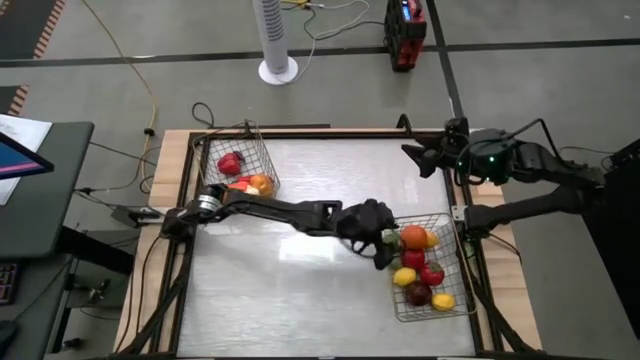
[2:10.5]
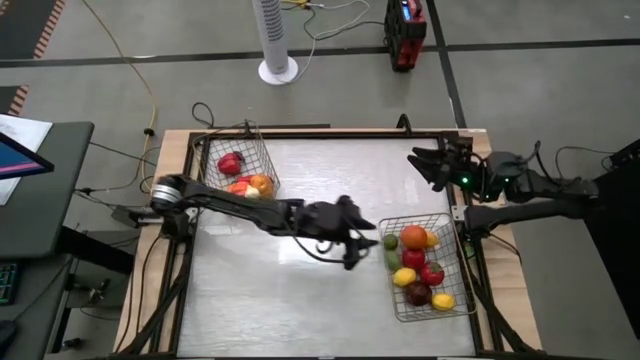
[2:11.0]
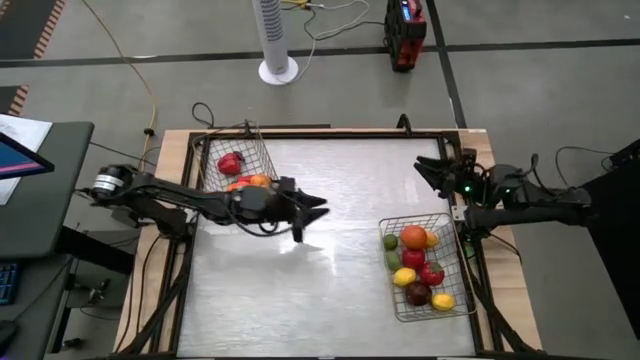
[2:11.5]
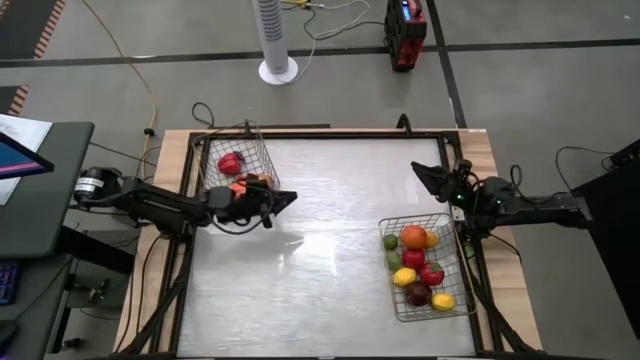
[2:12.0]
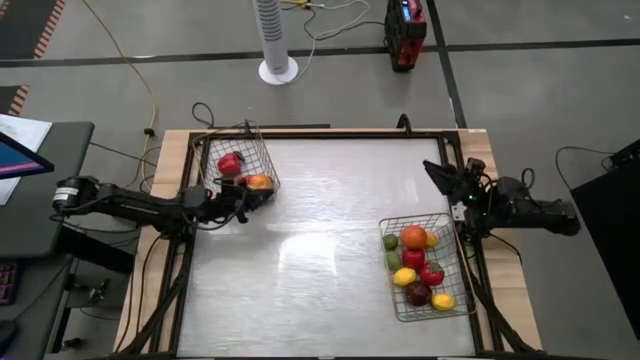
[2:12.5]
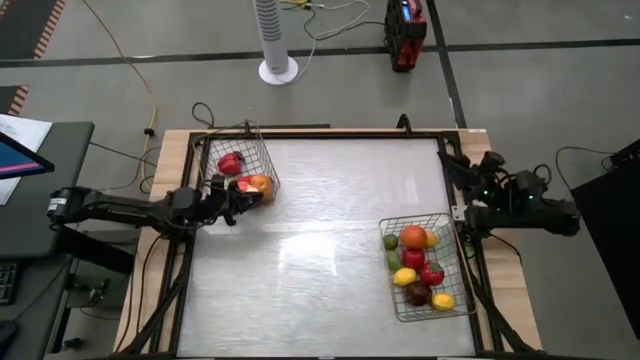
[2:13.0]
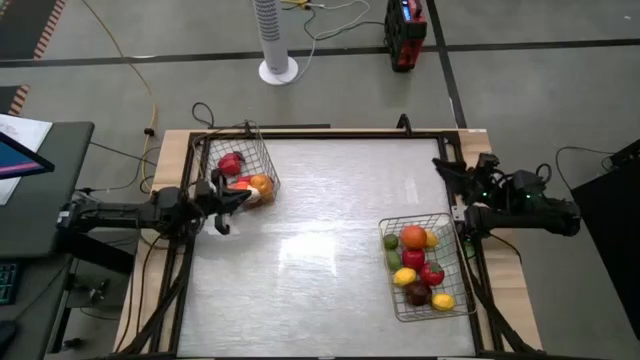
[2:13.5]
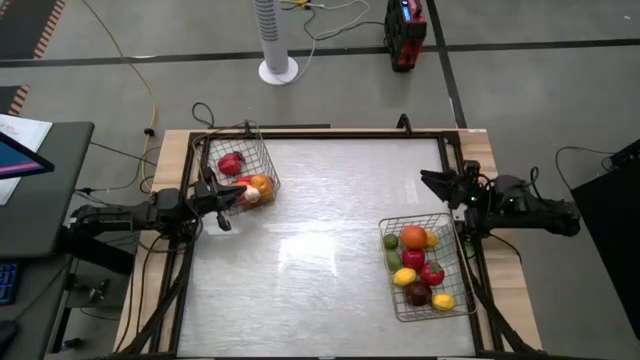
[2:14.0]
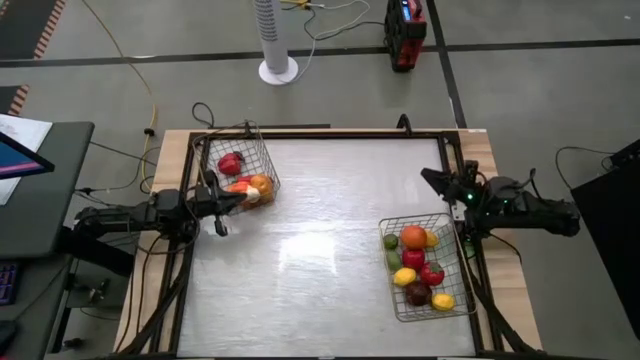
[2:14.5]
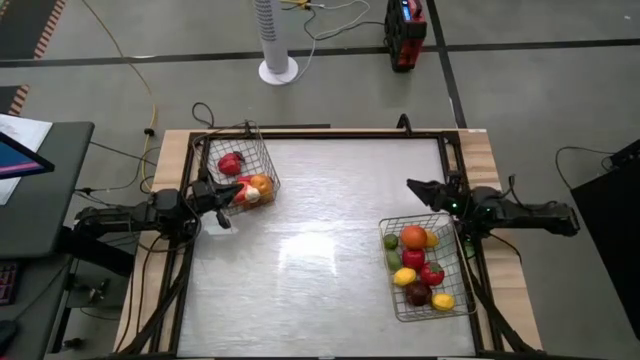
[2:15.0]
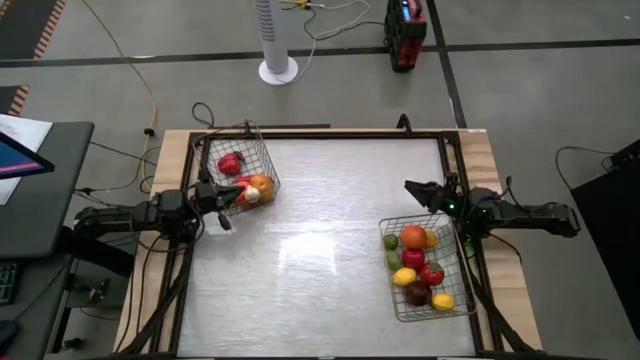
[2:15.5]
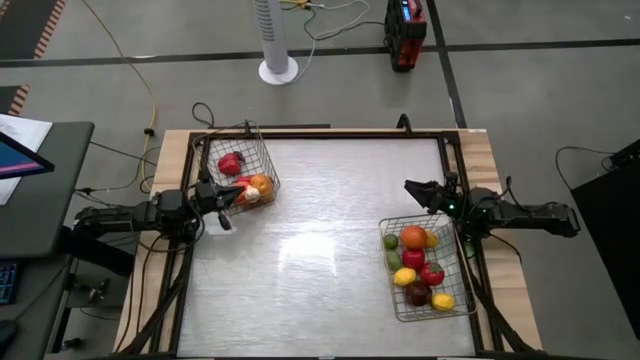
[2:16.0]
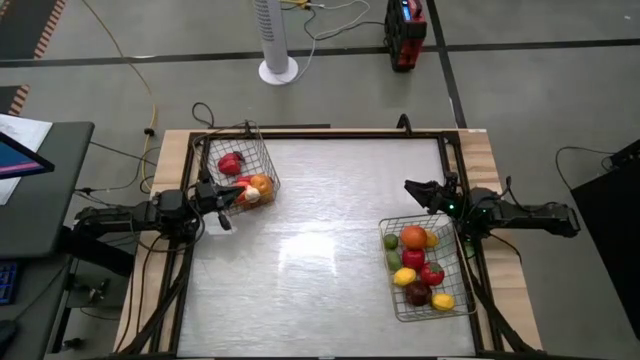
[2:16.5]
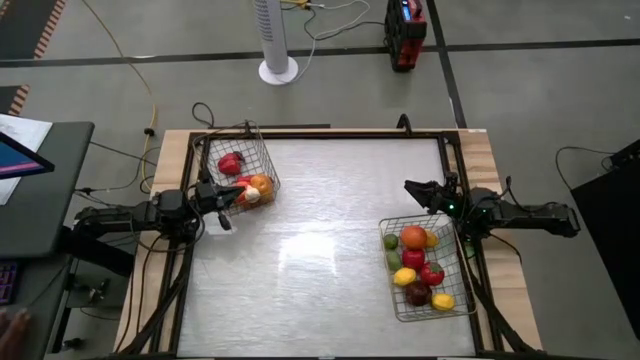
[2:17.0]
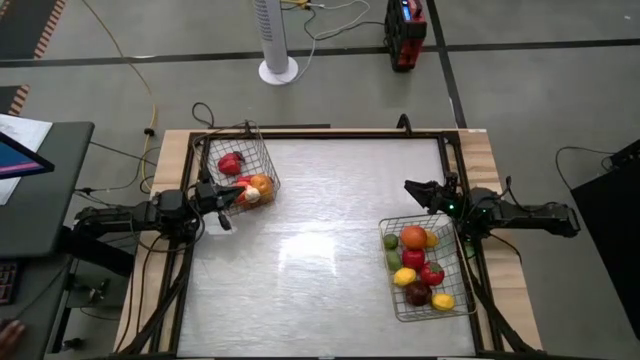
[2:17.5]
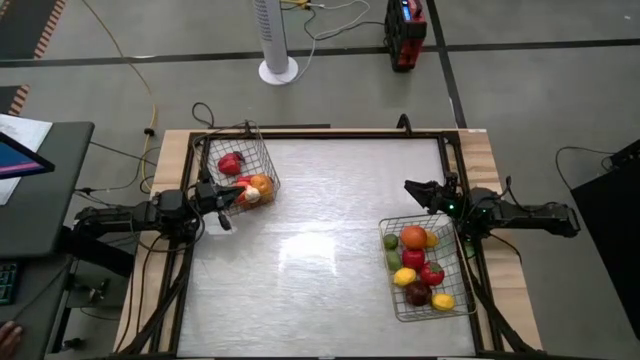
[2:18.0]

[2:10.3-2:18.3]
Task: Sort produce into baskets
Return to Home Position

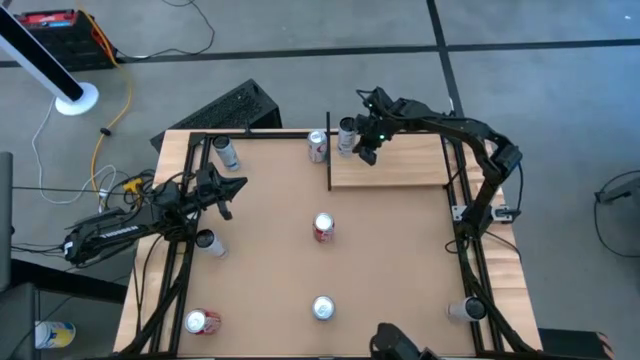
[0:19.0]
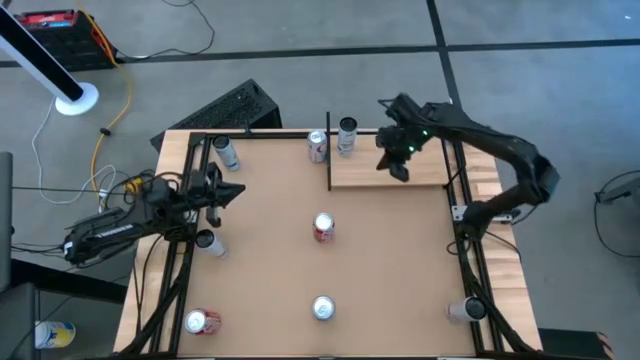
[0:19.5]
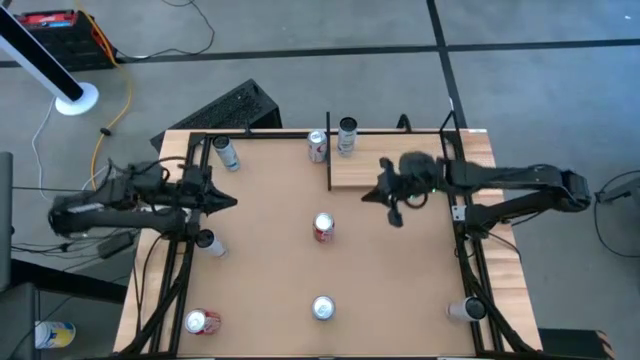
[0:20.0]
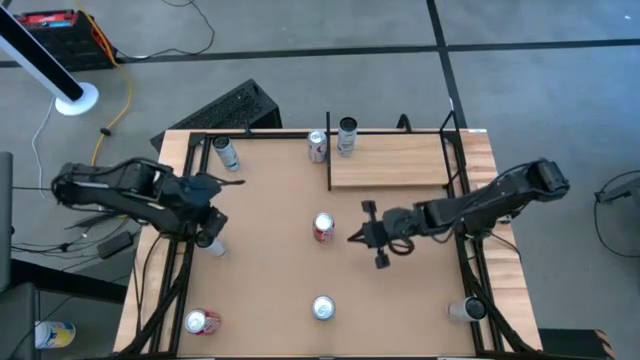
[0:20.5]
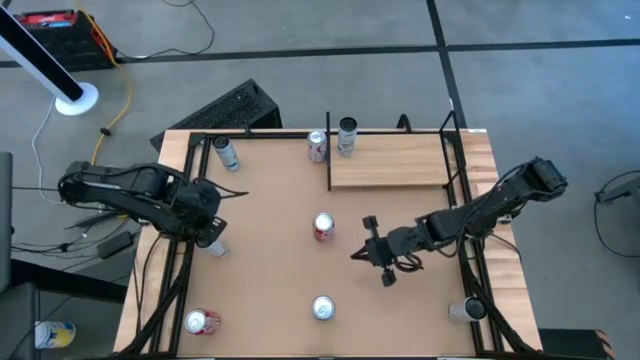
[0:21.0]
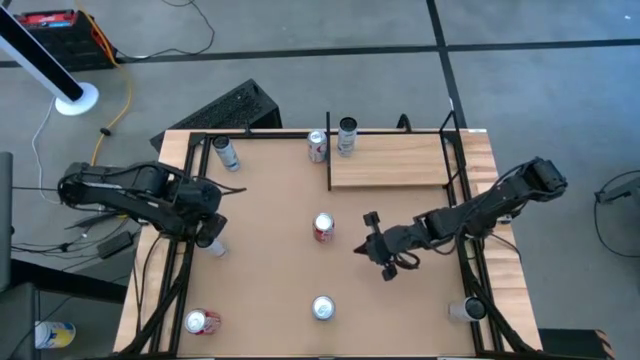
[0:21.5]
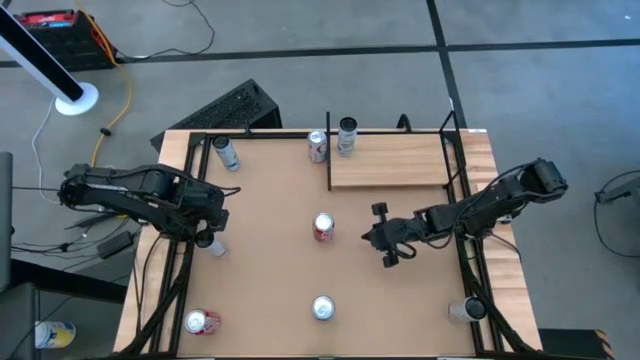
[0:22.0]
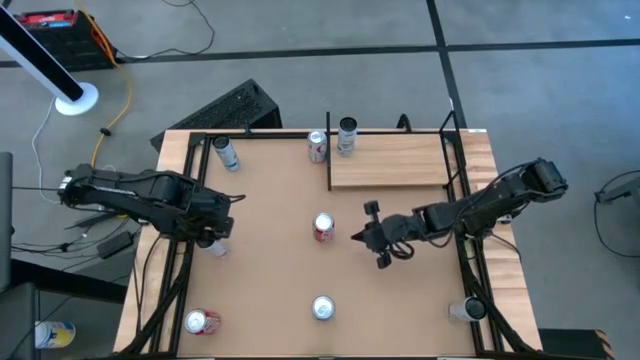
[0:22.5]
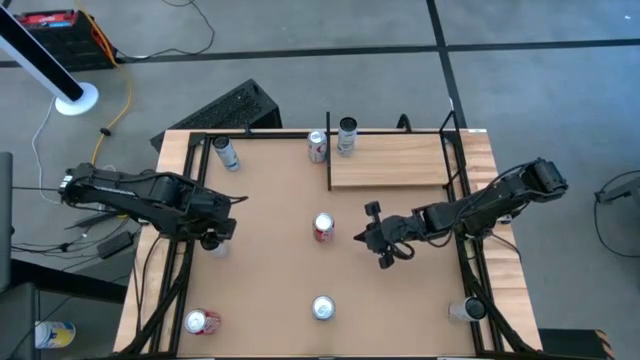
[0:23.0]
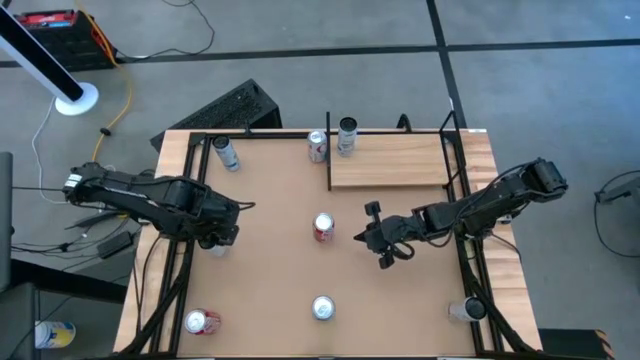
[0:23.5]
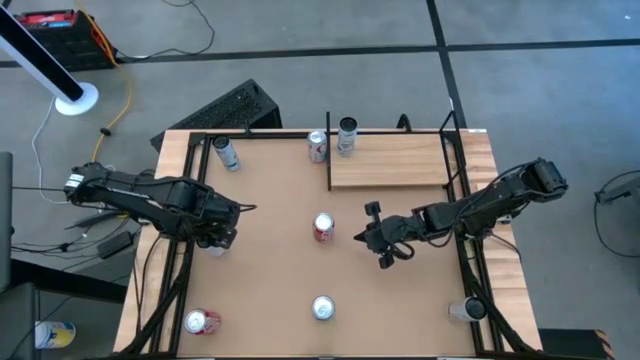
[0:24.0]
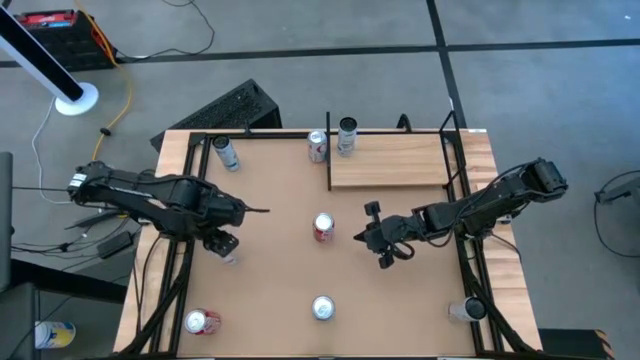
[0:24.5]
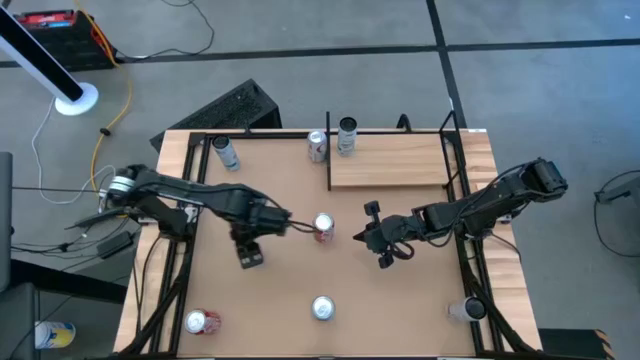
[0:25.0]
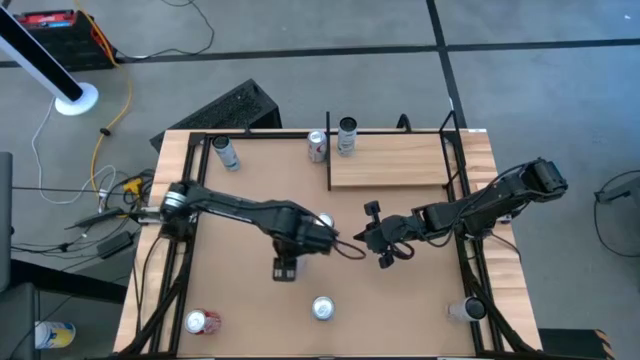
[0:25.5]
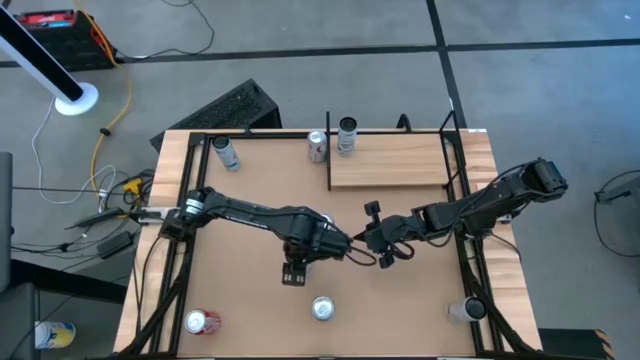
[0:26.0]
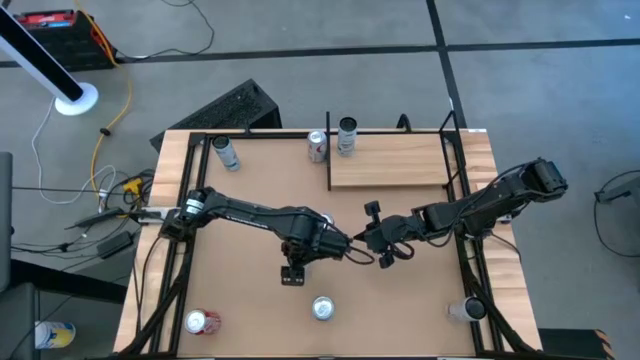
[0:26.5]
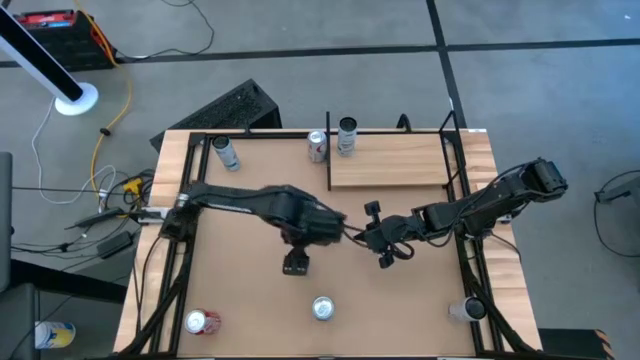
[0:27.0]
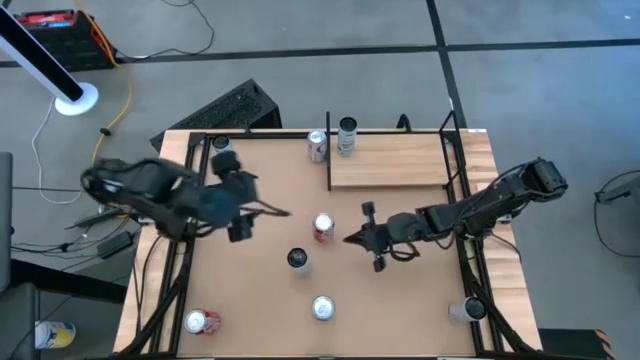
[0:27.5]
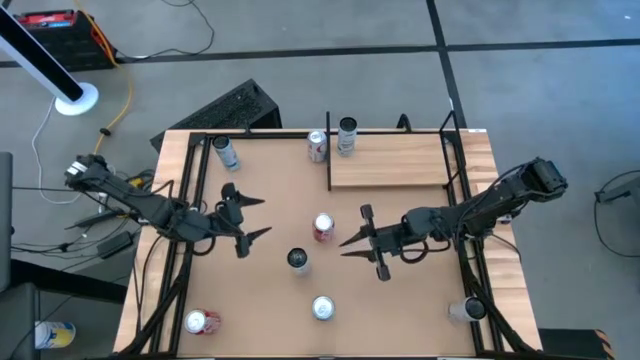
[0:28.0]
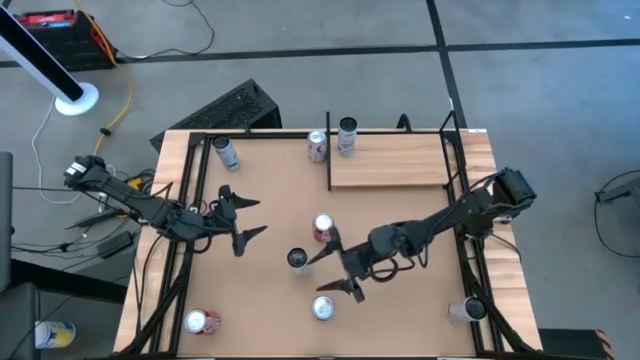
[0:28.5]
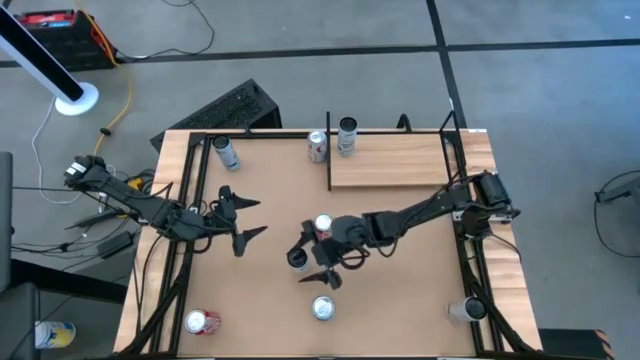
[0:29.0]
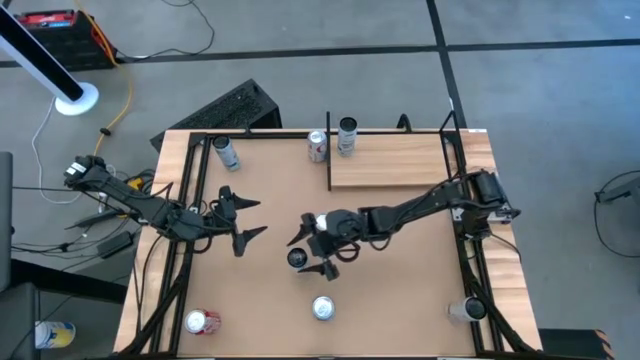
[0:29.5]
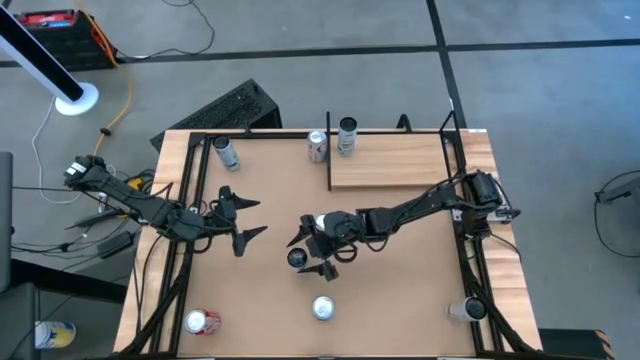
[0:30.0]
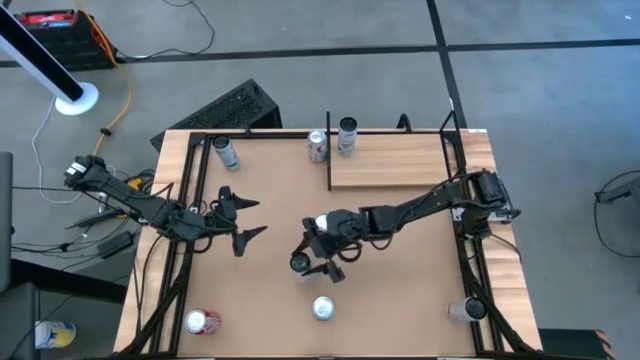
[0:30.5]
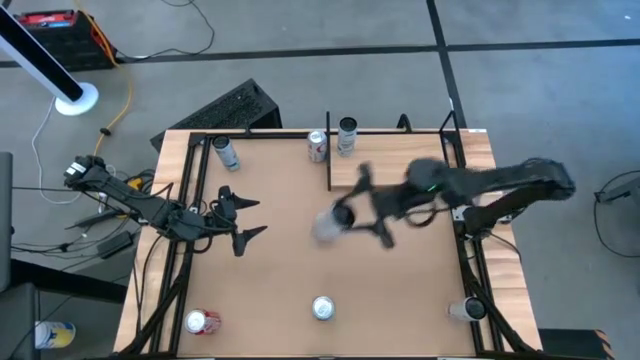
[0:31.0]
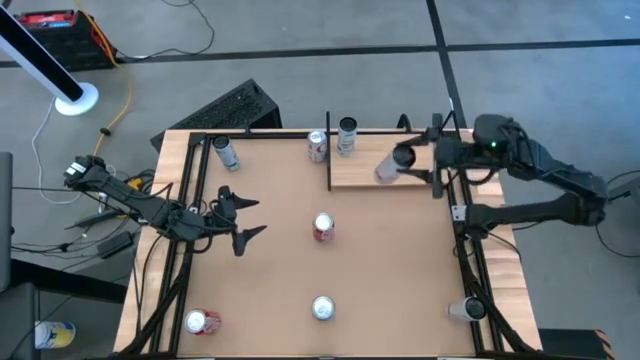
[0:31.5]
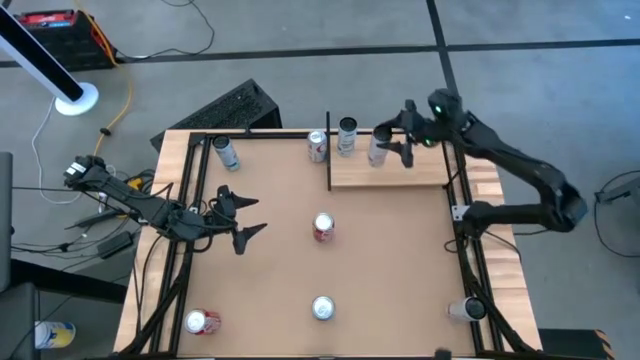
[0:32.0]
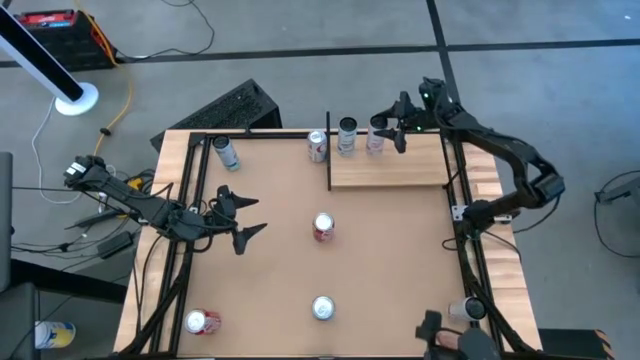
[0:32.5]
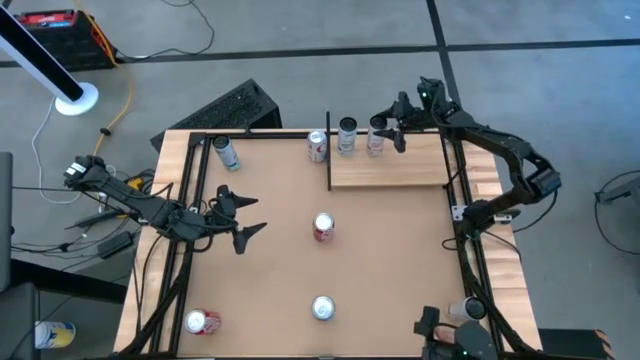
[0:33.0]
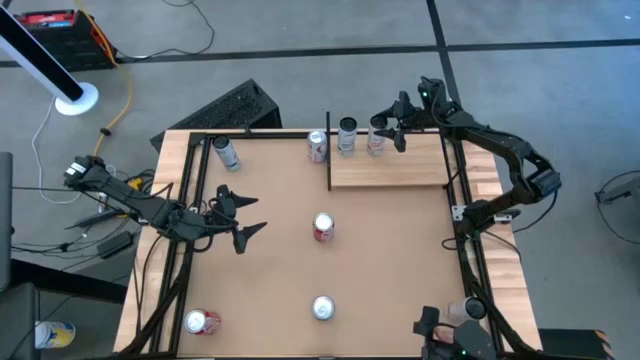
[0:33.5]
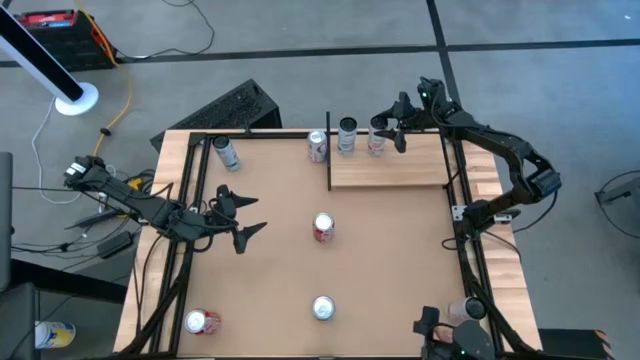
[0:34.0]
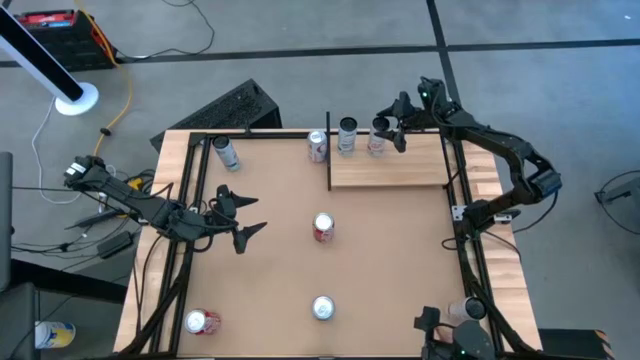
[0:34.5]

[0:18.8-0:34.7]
Task: Place canned beverage on shelf
Put the top silver and pink soda can on the shelf
